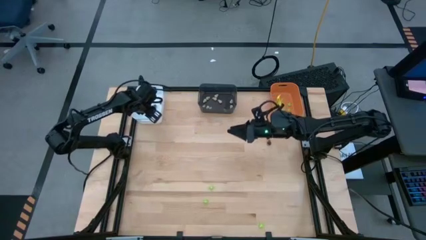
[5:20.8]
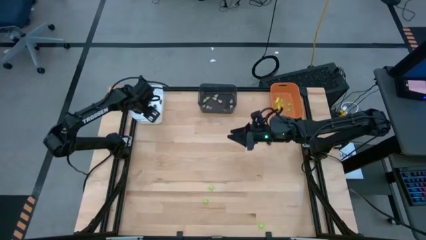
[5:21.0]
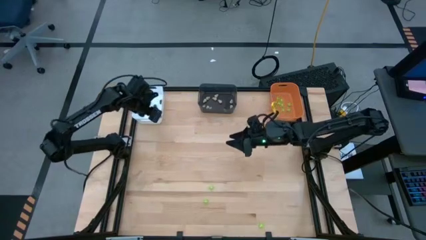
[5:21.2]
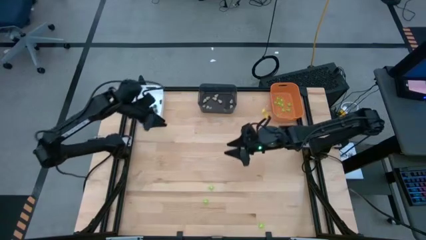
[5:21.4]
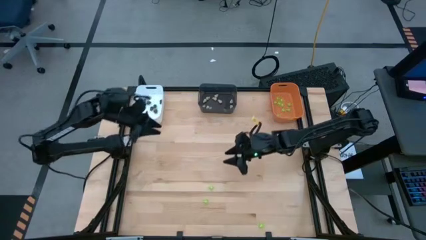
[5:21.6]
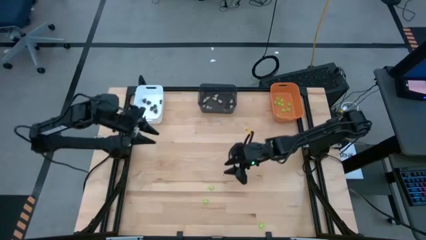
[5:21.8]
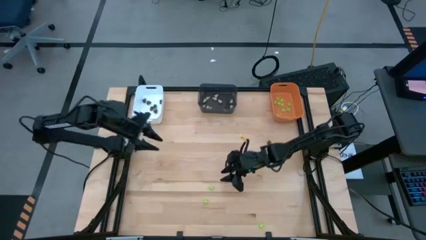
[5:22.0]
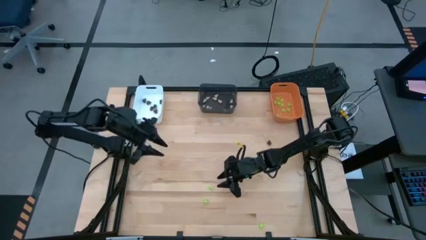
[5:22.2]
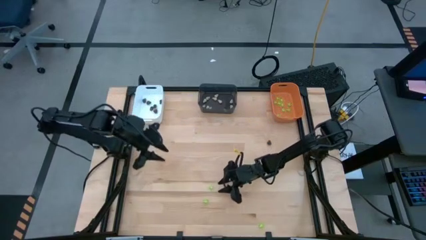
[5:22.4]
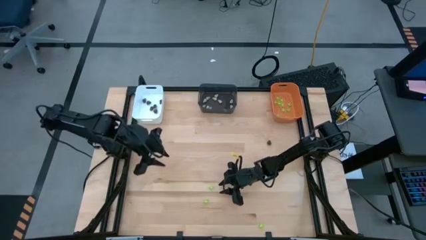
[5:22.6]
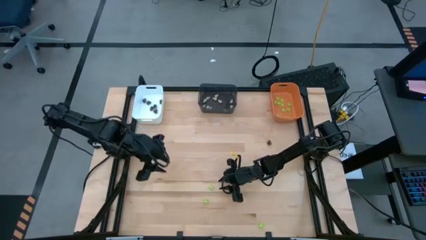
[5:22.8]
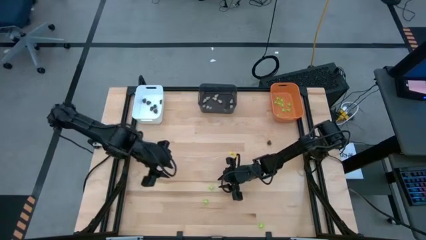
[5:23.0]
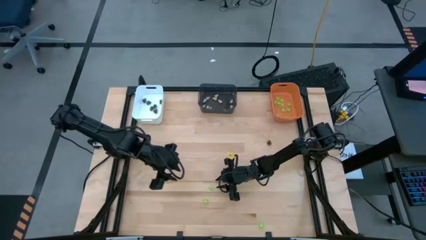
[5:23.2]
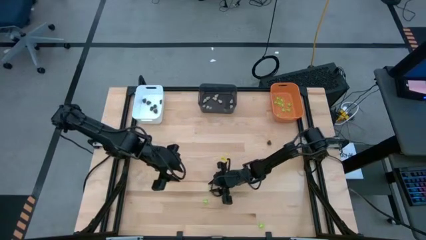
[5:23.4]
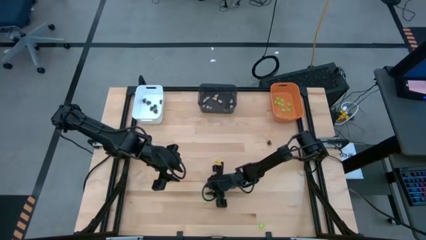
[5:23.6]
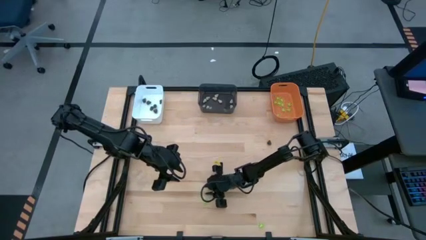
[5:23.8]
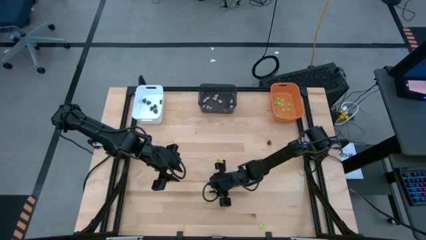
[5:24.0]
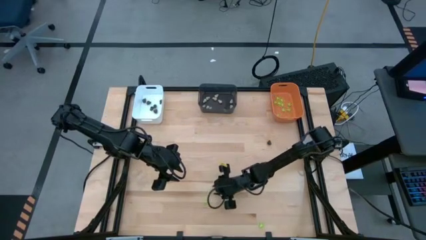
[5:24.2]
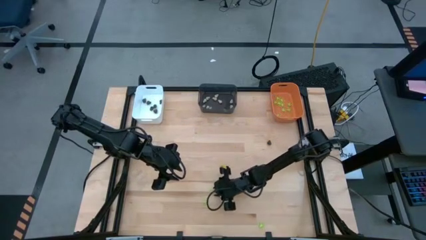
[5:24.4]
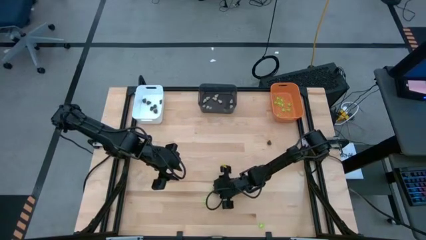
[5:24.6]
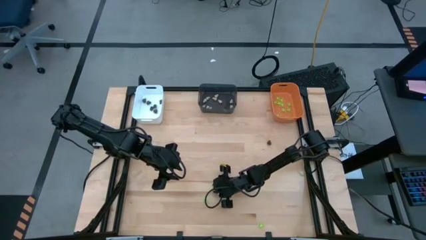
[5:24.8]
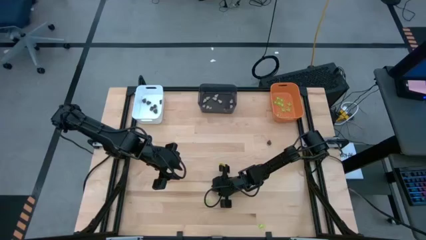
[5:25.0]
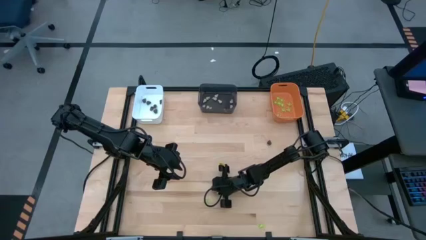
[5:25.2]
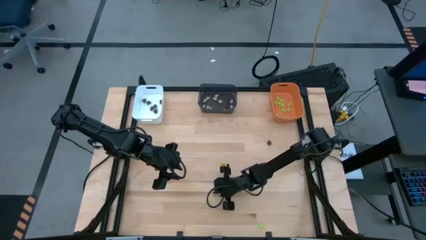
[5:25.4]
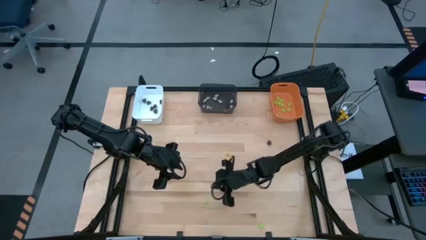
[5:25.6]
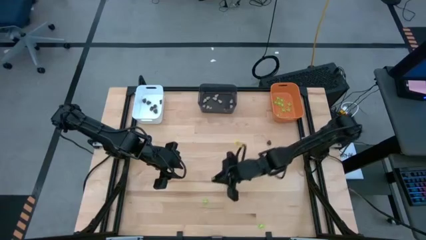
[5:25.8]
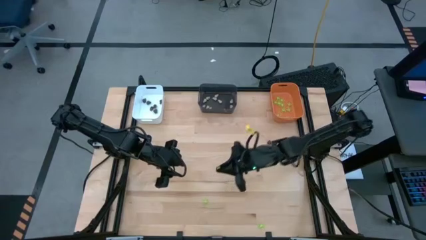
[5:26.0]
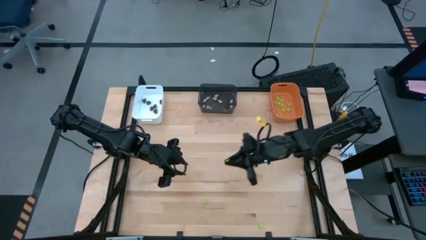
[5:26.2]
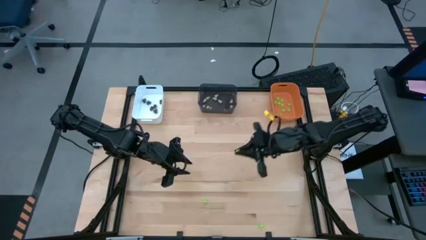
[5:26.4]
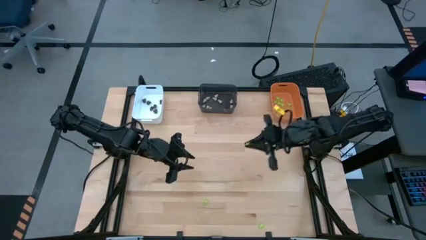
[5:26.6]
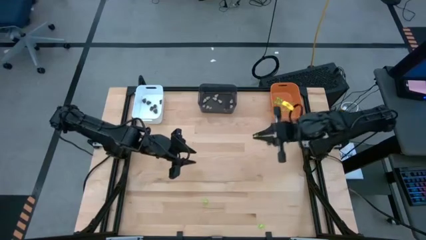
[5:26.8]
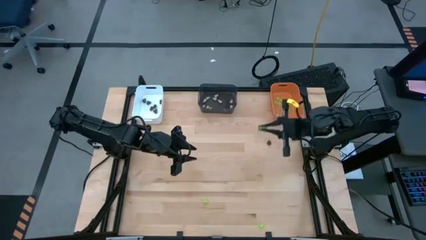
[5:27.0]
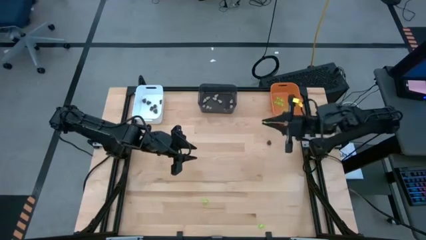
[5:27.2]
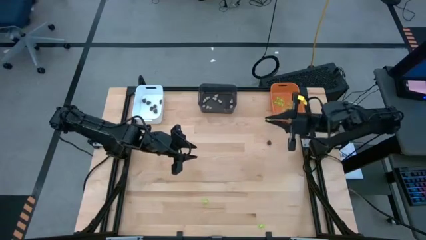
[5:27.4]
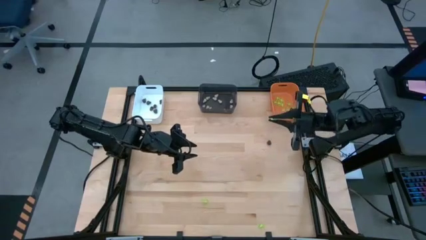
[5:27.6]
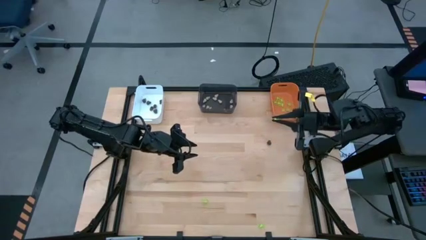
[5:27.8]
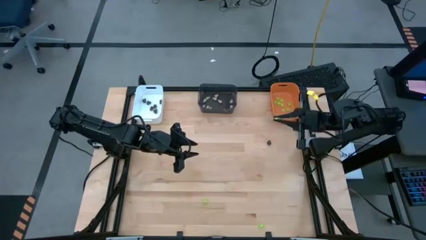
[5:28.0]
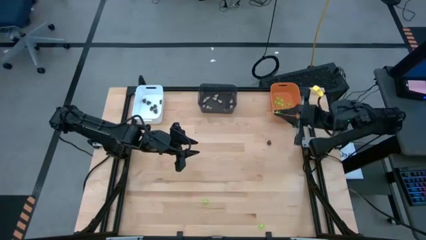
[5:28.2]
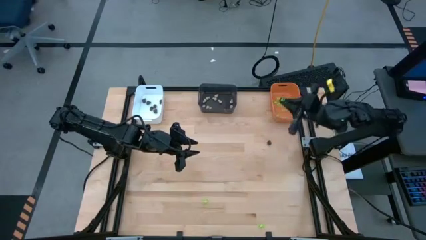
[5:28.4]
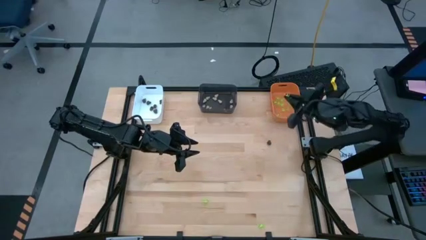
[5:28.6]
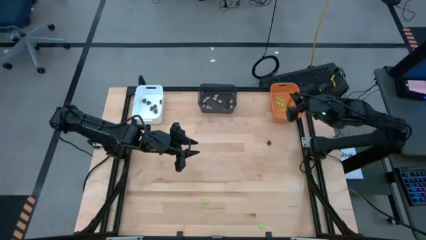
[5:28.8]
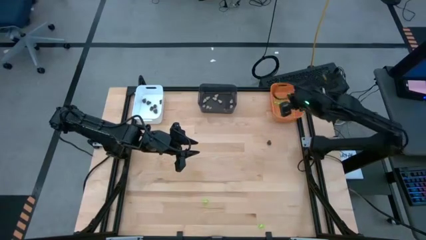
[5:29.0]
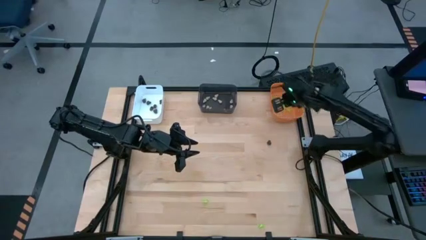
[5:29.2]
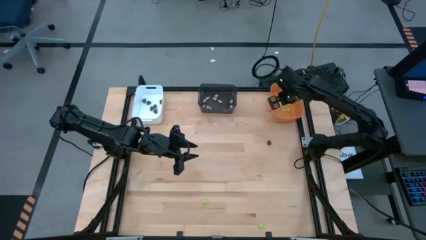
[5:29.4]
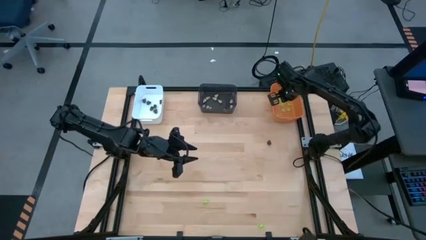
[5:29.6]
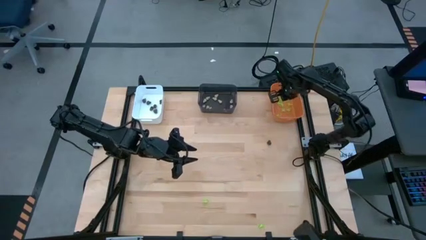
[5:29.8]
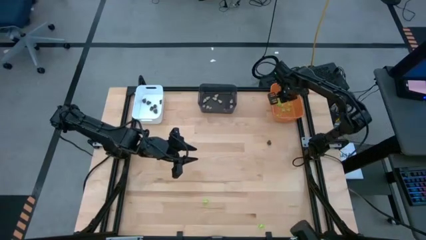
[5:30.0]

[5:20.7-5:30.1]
Task: Sort Halloween decoration
Put the green toy spider into the orange bin

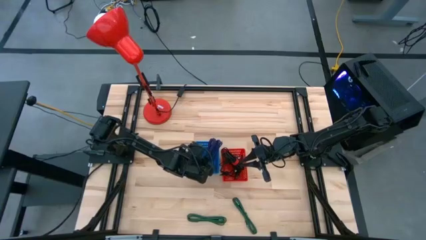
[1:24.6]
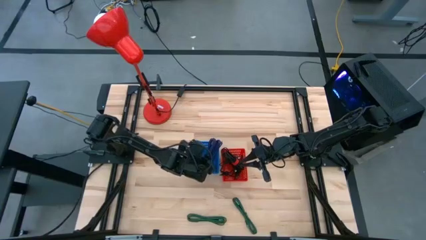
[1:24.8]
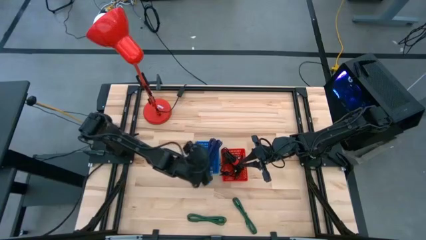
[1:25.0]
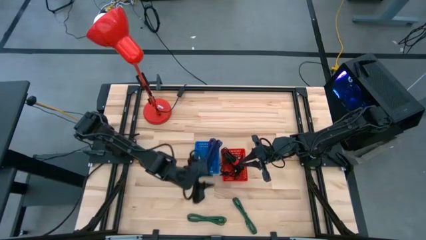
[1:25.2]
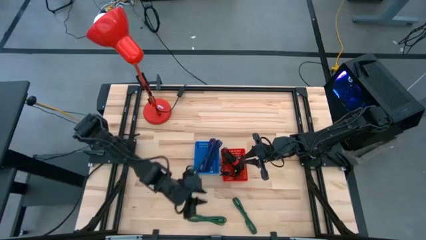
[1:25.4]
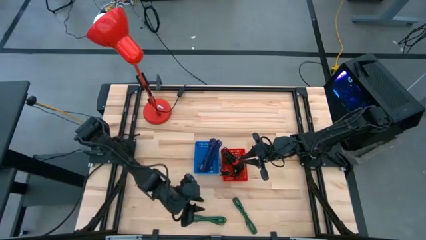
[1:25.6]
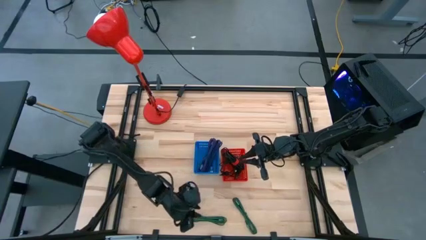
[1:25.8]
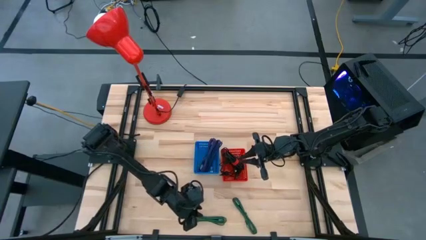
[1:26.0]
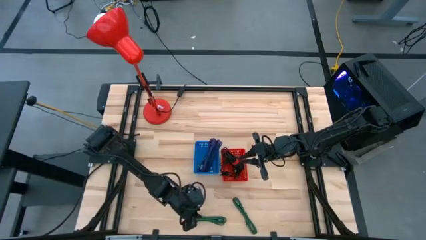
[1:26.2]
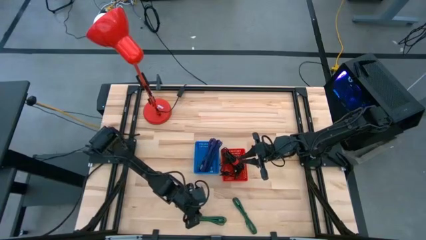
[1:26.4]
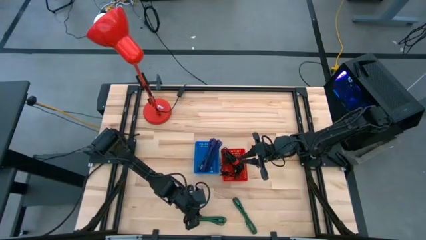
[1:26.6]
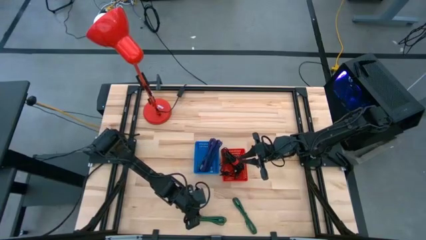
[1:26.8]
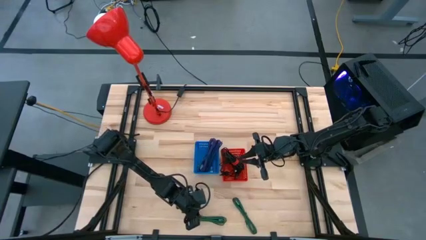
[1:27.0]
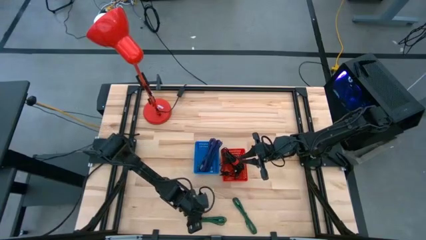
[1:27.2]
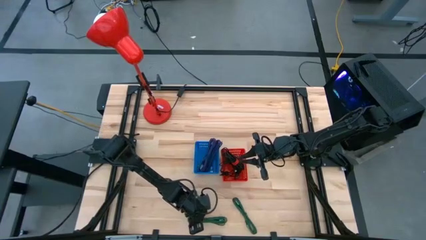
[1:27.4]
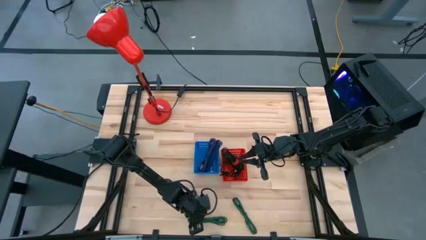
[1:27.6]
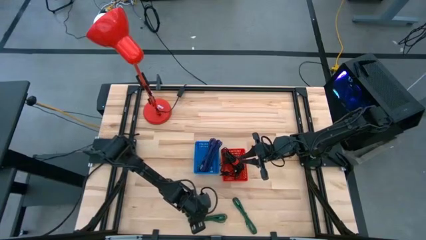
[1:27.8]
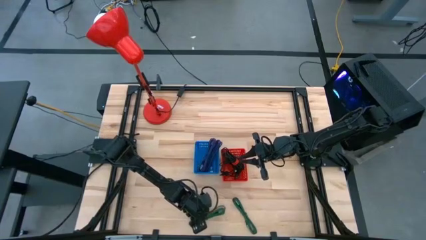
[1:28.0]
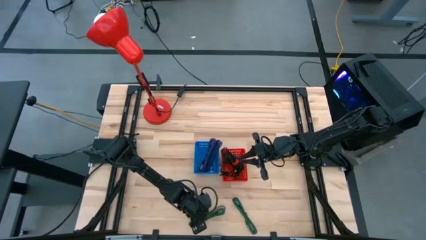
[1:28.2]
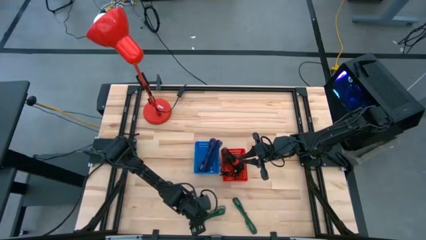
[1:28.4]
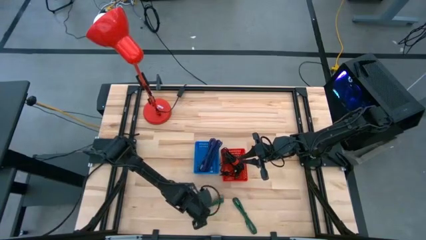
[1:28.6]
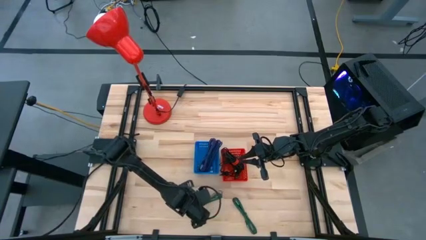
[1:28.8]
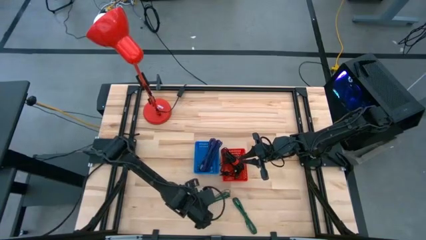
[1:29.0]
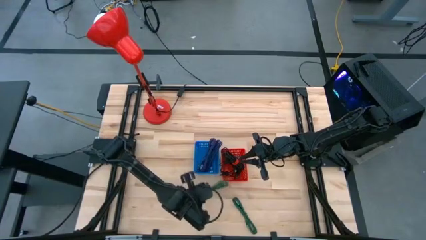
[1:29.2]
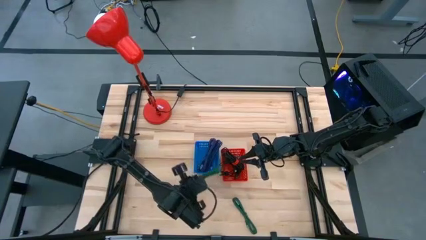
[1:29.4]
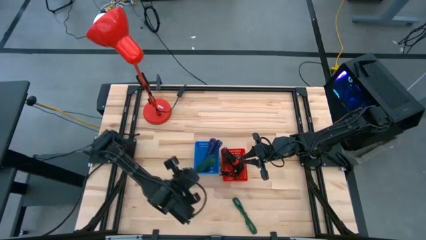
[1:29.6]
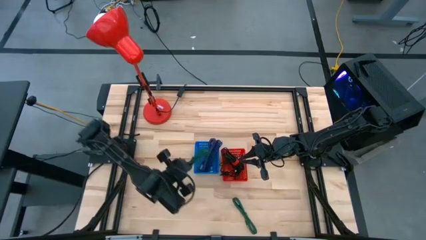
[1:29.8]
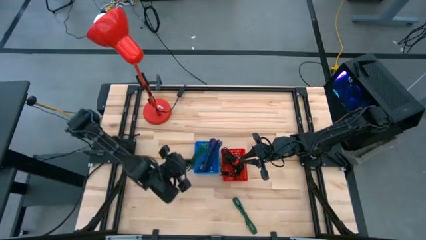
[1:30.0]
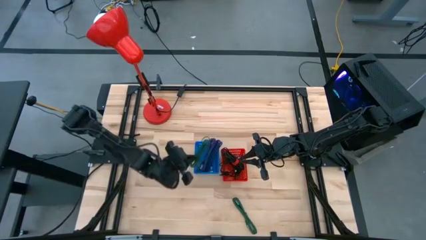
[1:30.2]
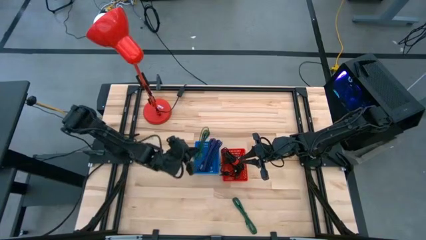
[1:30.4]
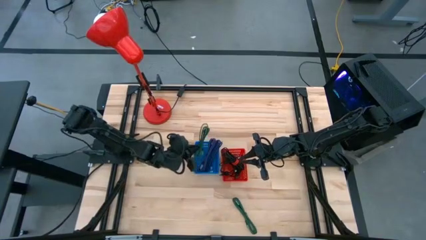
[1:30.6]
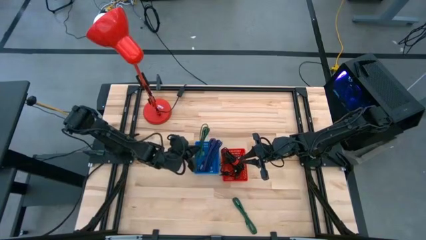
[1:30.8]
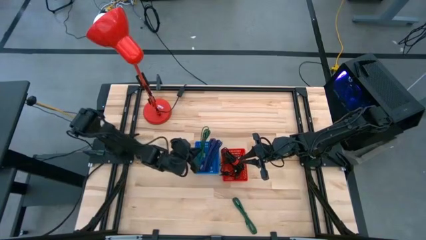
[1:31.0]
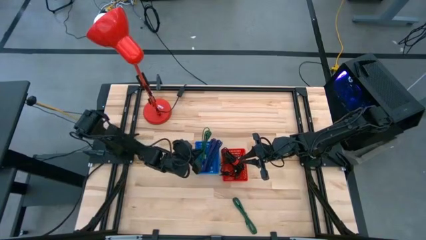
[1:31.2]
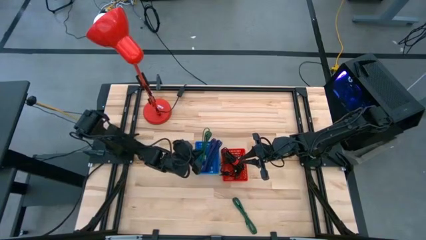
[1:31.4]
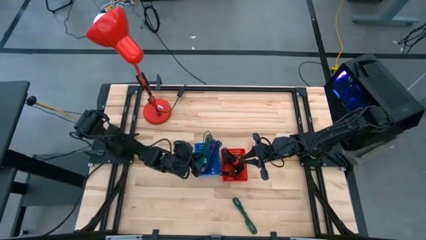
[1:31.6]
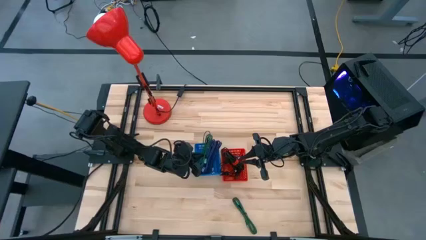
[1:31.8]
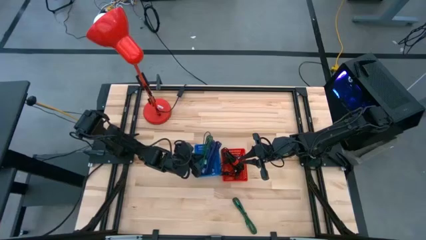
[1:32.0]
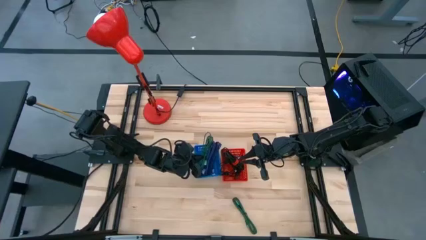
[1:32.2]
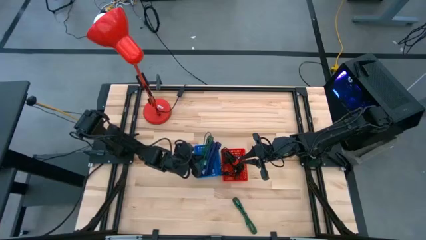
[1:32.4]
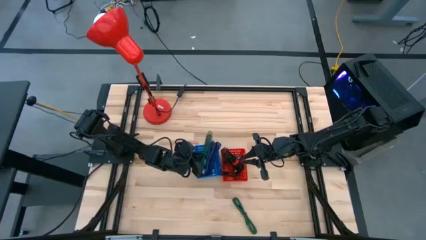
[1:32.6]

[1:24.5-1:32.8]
Task: Pick & Place USB Port
Put the green charger cable into the blue bin
